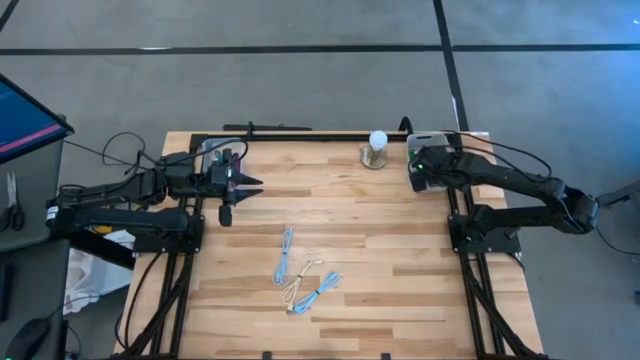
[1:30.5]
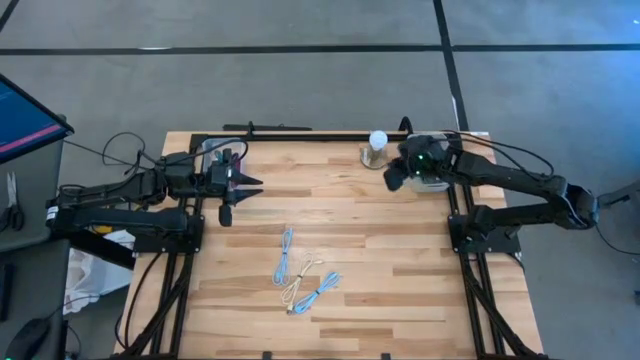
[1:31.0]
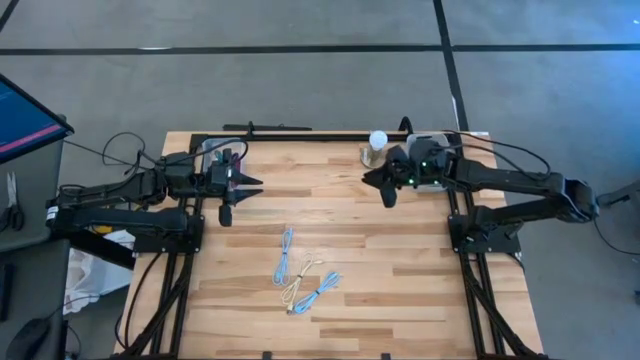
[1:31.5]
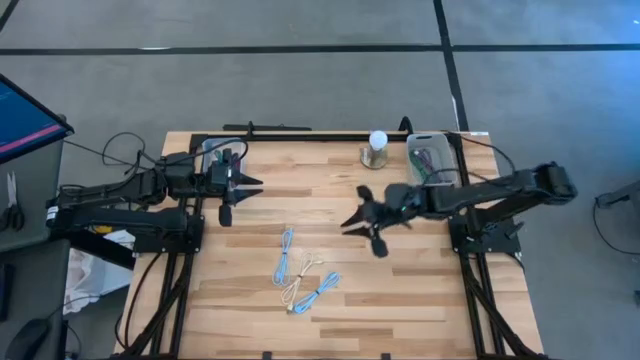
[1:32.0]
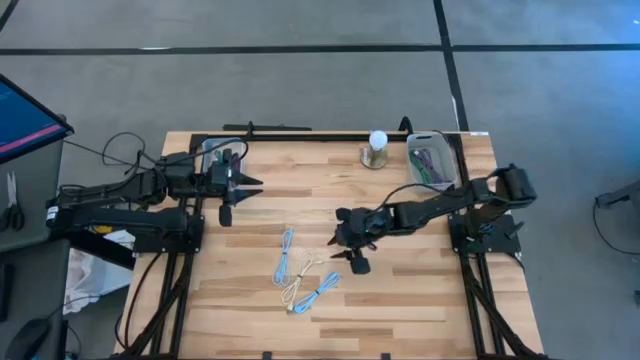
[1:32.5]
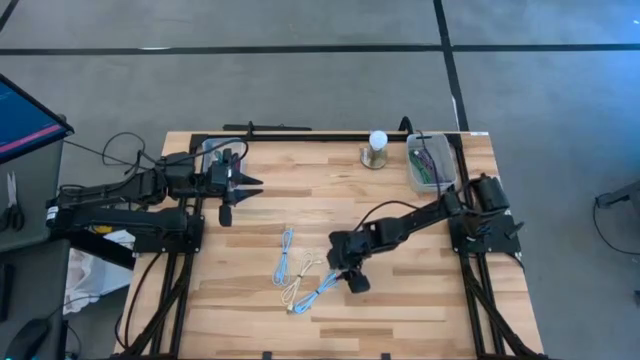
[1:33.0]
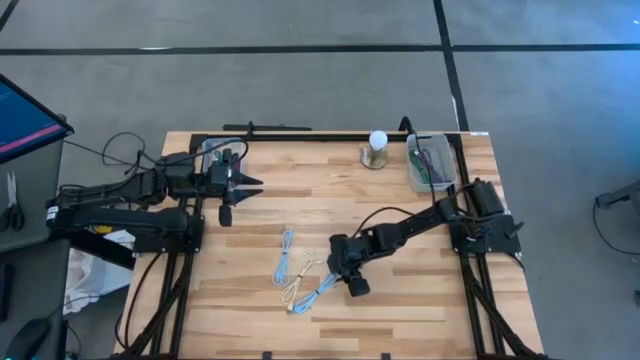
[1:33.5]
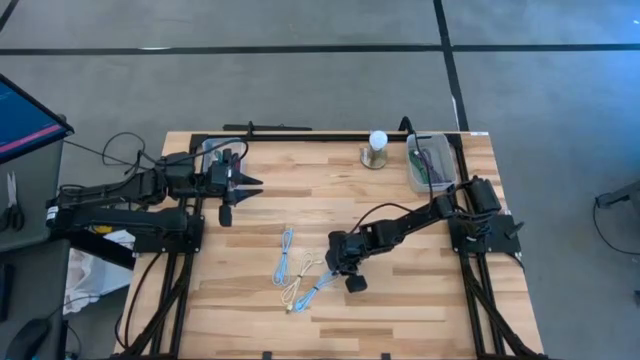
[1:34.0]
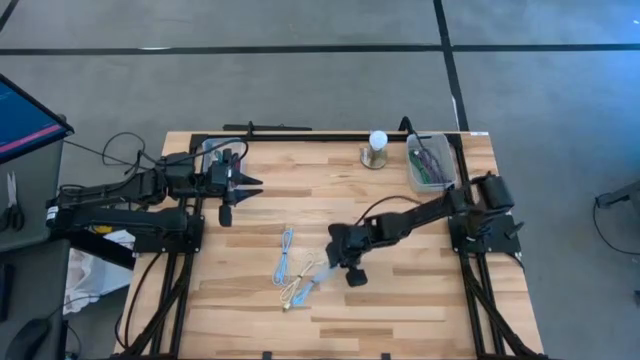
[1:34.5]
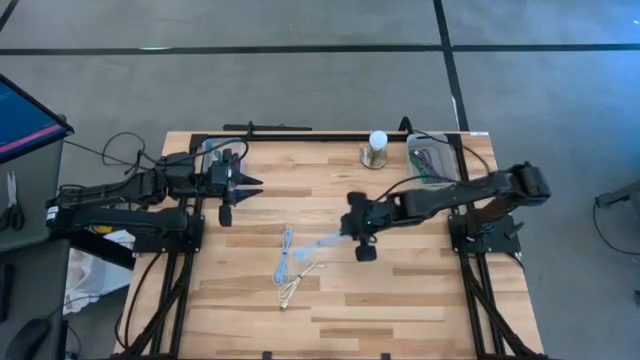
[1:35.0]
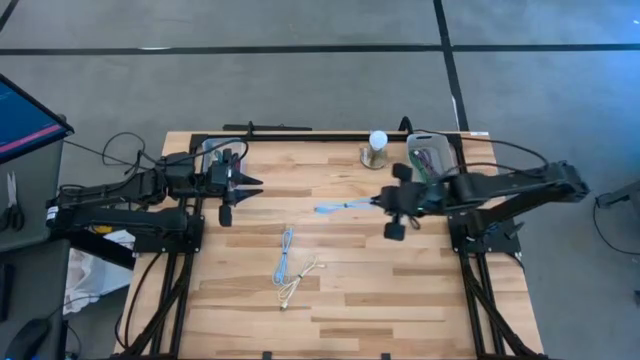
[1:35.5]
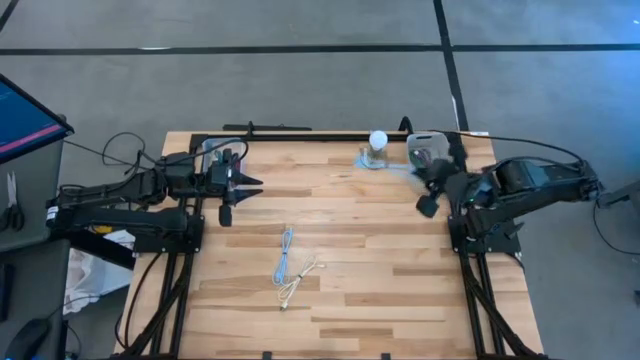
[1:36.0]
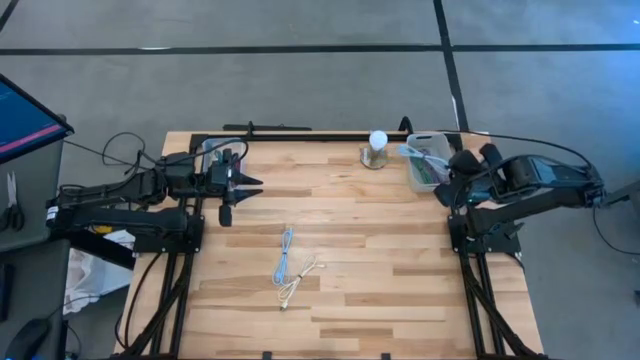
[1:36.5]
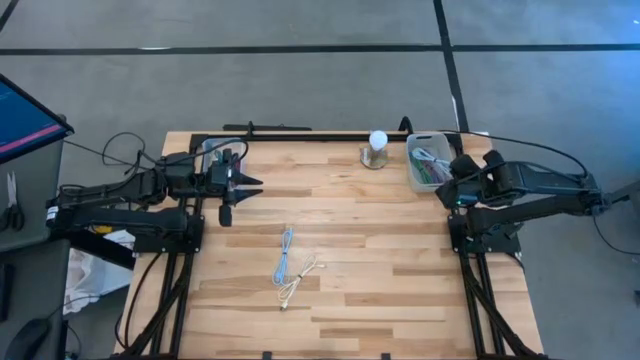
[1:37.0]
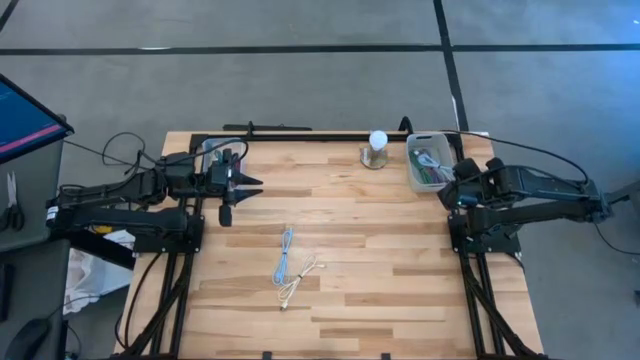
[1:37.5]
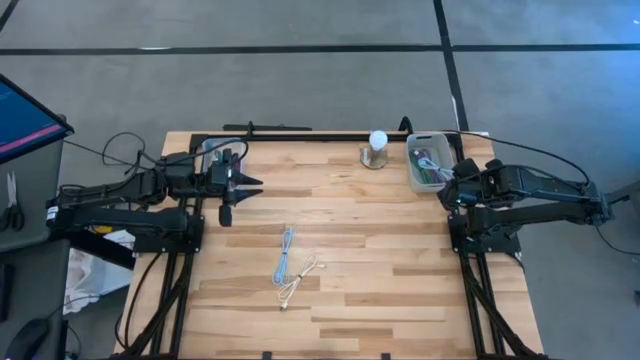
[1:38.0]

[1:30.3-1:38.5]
Task: Pick & Place USB Port
Put the right blue charger cable into the gray bin

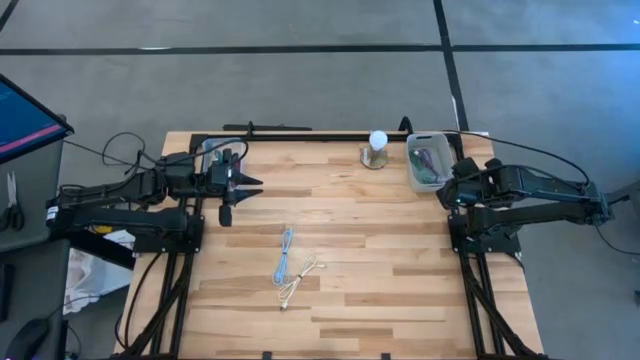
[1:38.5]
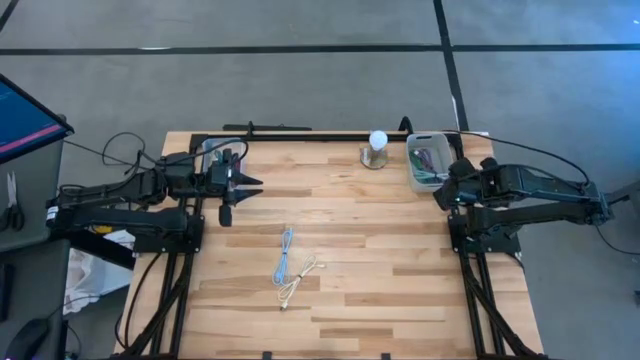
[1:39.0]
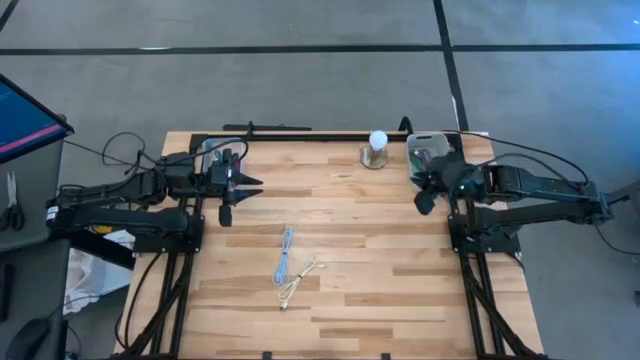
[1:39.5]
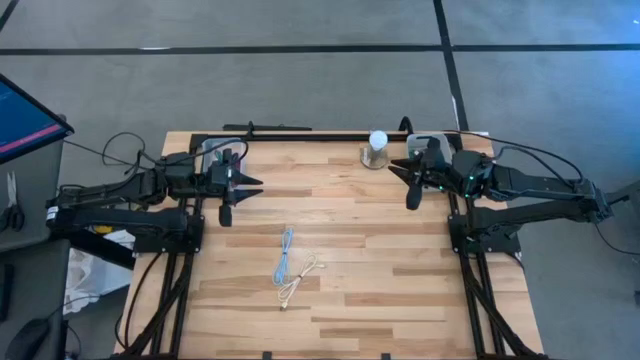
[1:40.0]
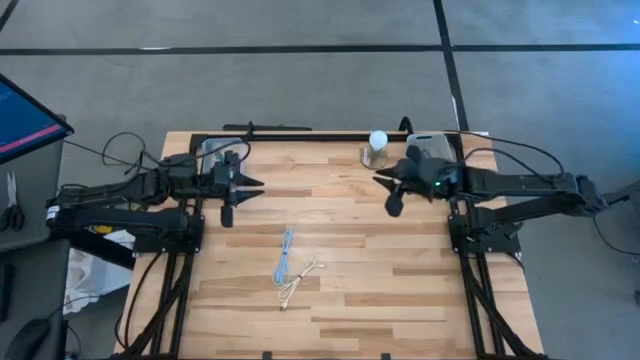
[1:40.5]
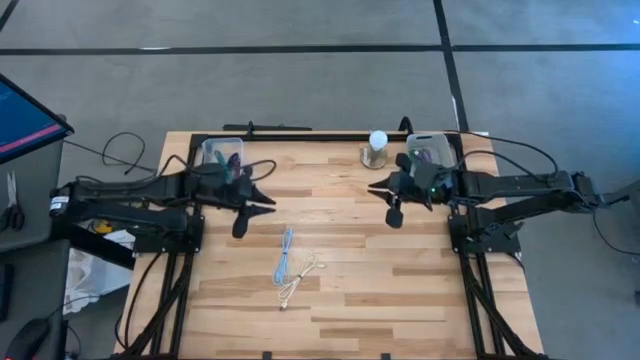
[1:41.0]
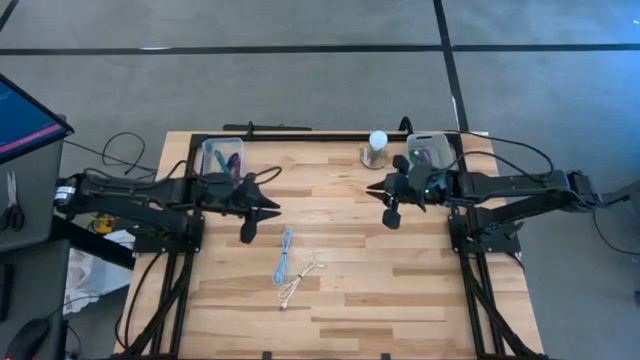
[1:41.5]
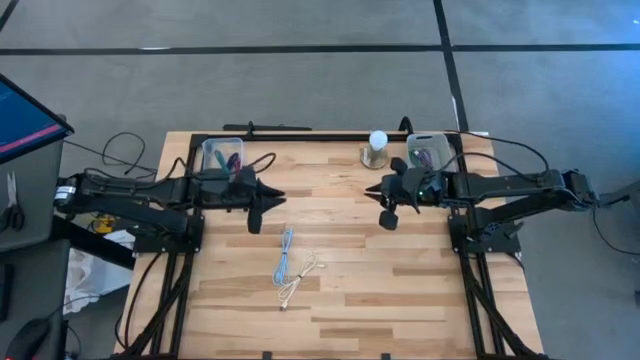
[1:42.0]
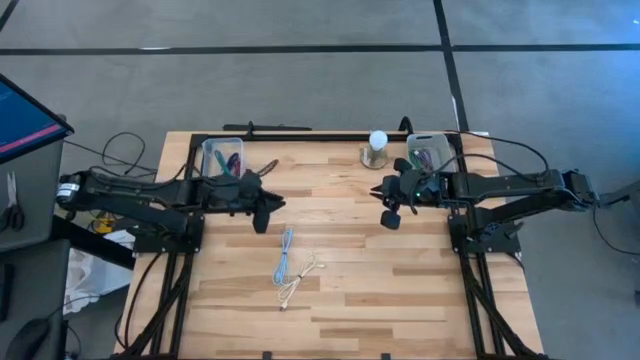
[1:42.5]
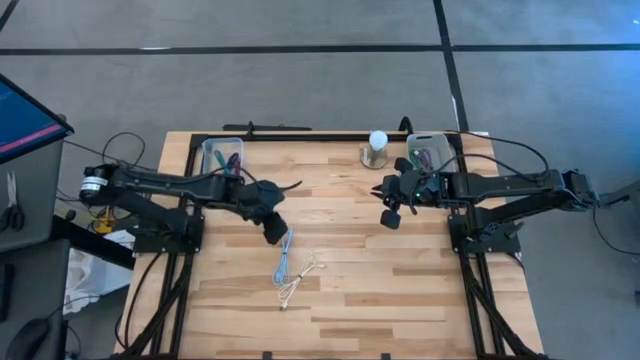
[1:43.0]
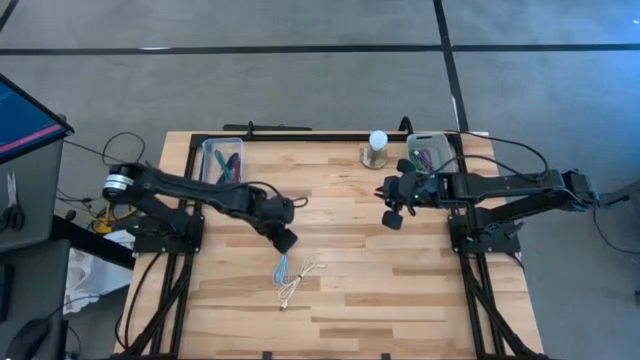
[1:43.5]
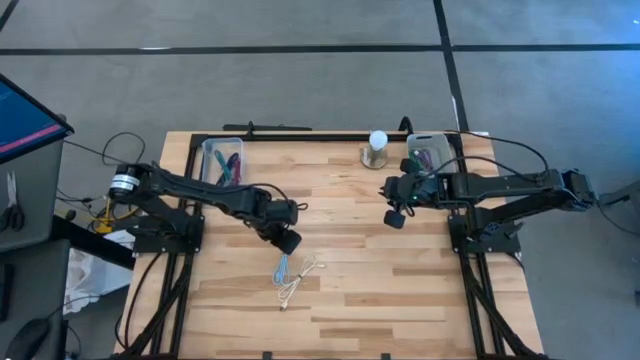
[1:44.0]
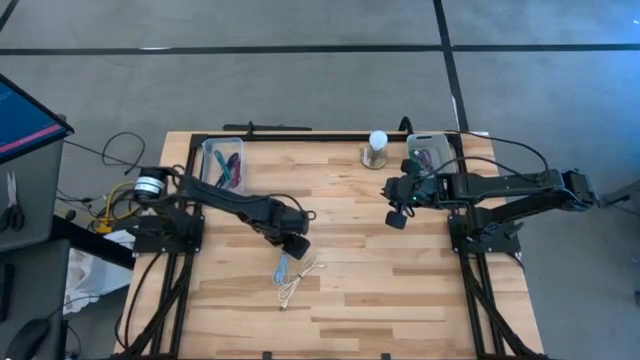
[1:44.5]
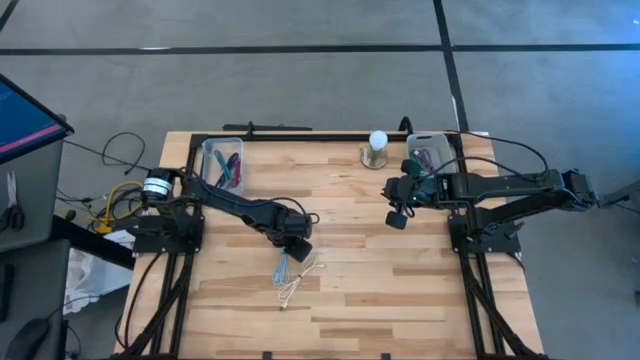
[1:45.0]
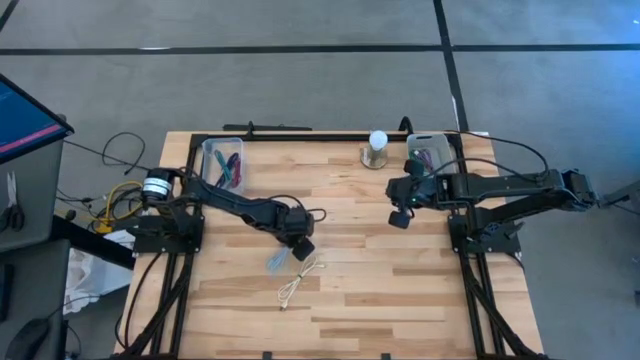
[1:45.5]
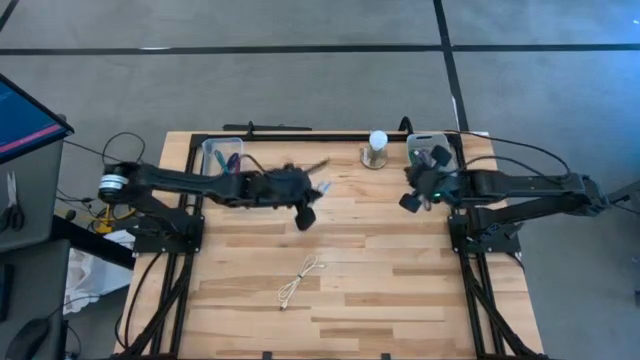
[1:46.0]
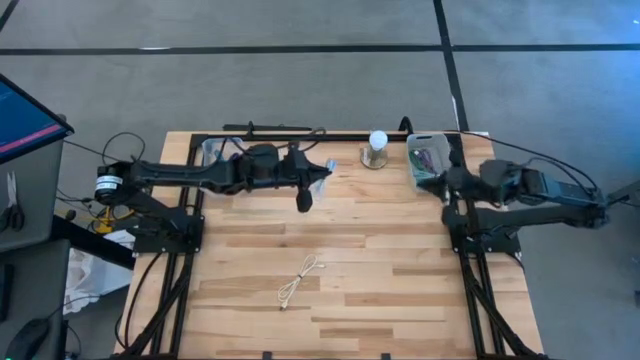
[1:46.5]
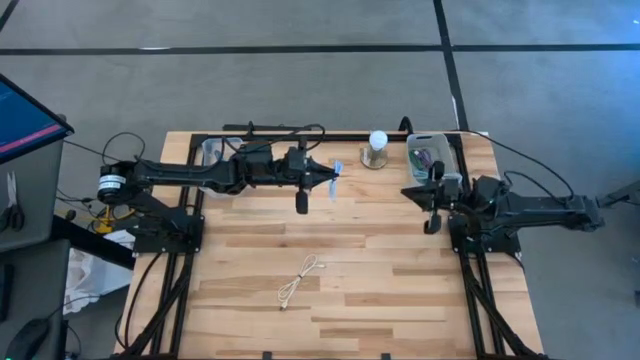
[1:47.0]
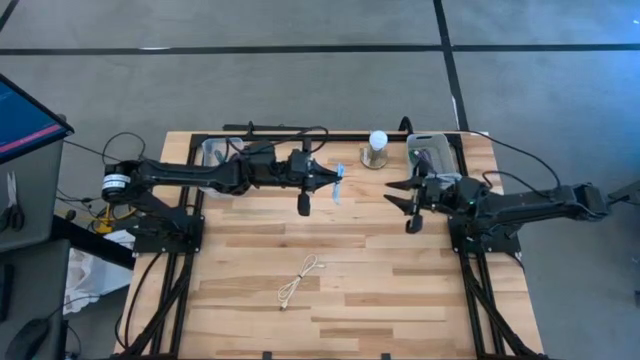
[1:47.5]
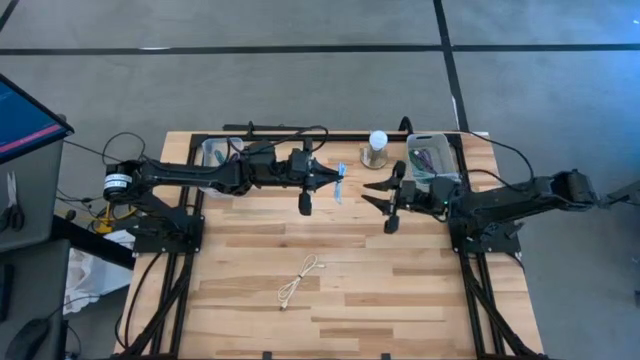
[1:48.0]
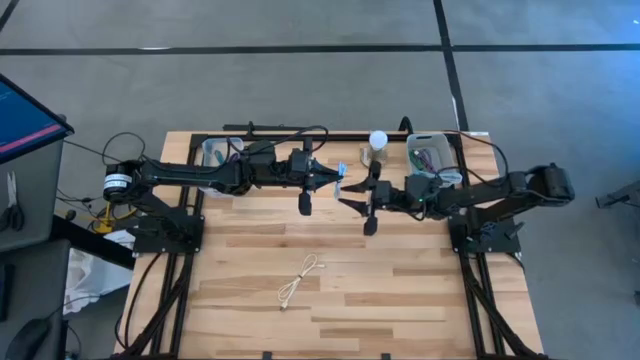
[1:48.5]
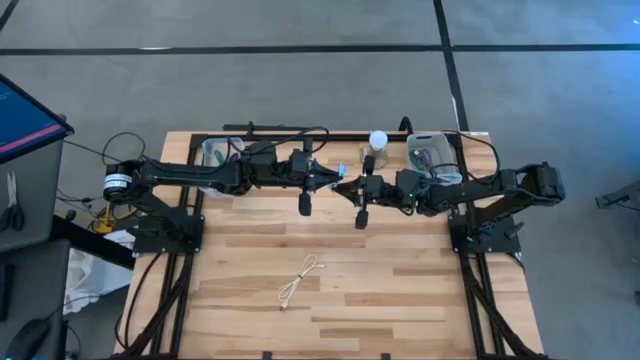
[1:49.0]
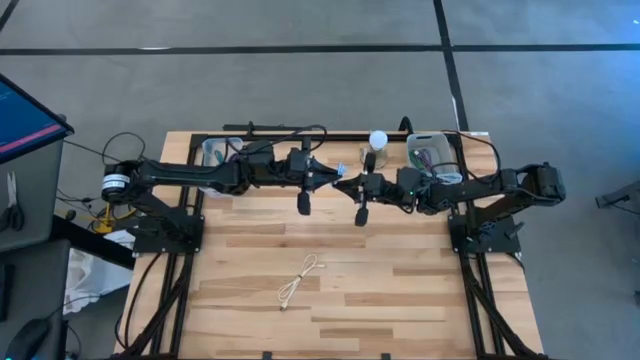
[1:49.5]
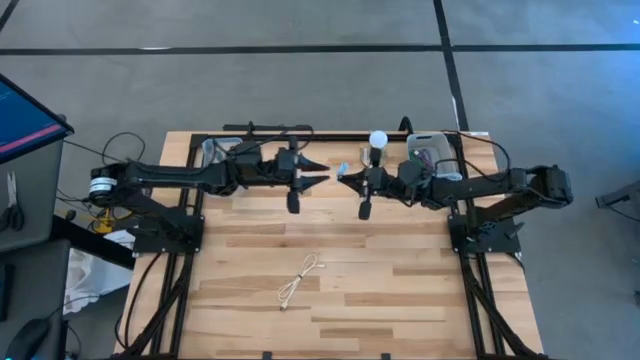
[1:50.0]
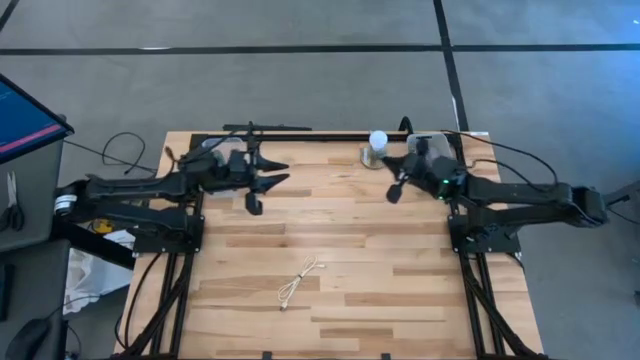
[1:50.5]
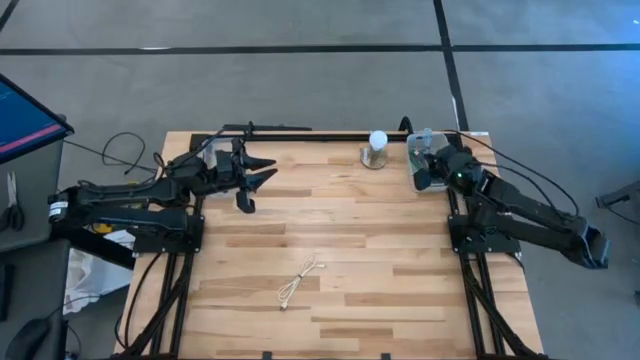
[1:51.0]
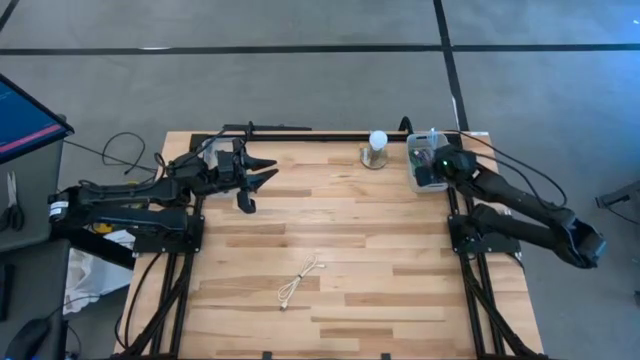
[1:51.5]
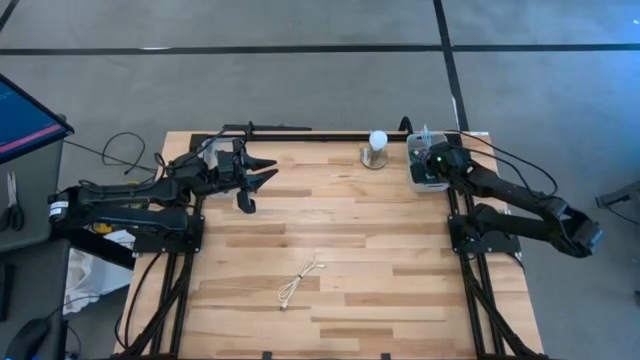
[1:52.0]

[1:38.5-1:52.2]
Put the blue charger cable into the gray bin
